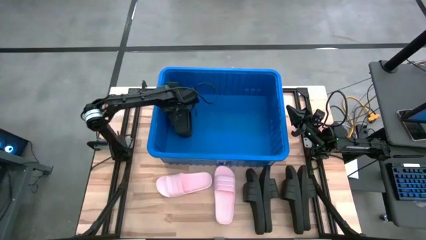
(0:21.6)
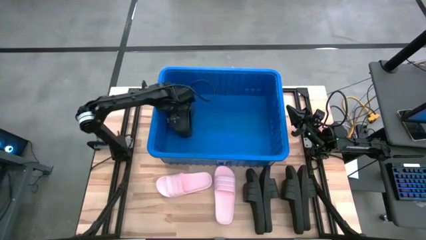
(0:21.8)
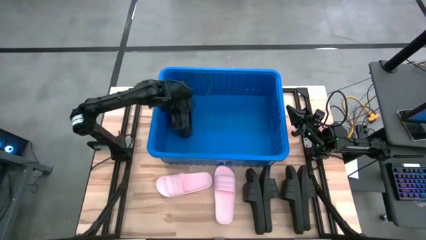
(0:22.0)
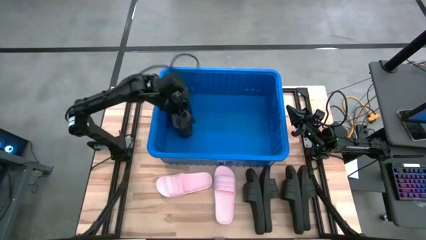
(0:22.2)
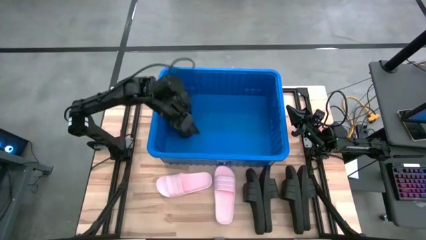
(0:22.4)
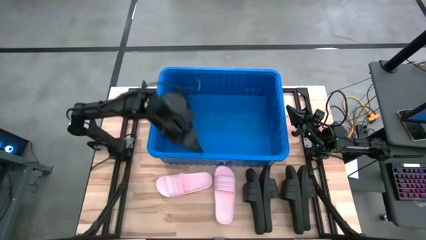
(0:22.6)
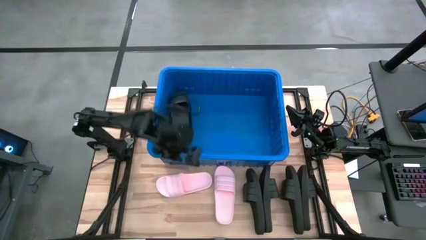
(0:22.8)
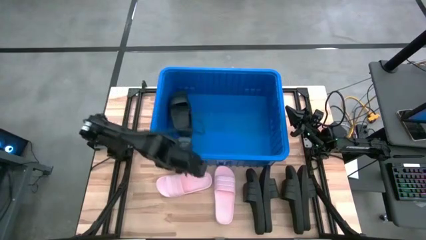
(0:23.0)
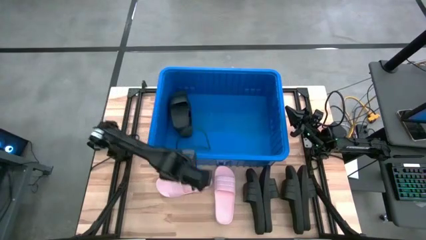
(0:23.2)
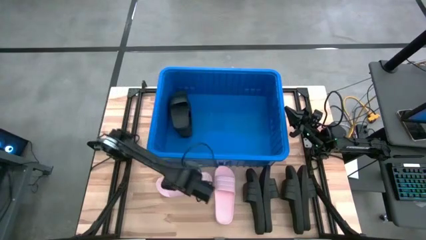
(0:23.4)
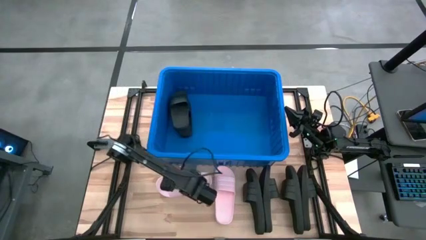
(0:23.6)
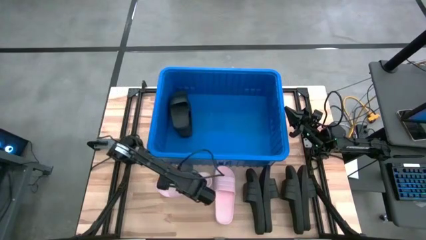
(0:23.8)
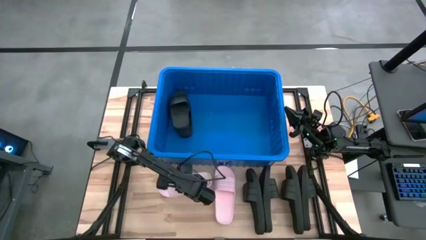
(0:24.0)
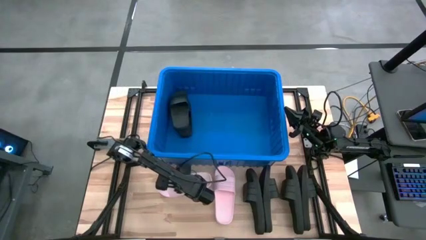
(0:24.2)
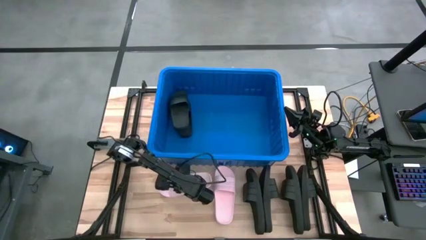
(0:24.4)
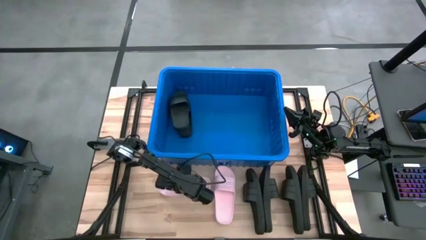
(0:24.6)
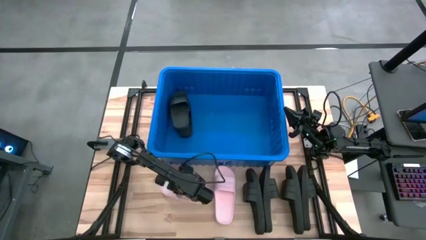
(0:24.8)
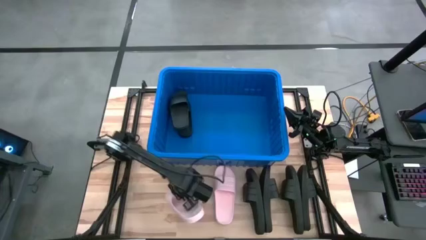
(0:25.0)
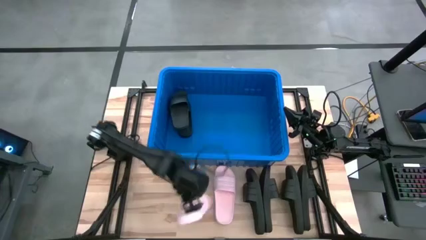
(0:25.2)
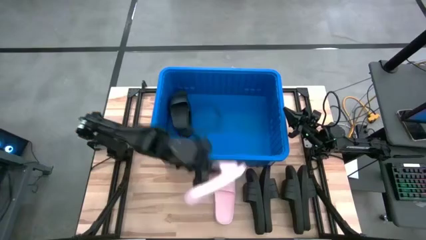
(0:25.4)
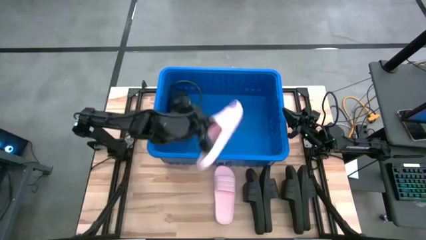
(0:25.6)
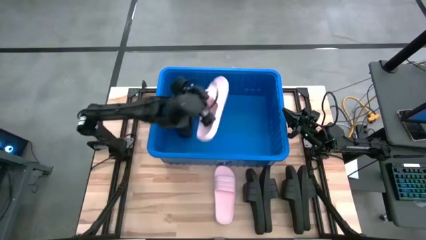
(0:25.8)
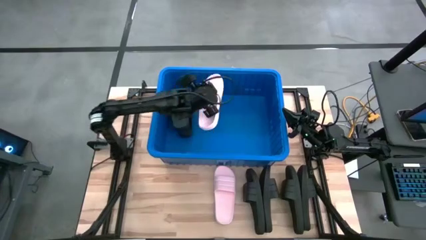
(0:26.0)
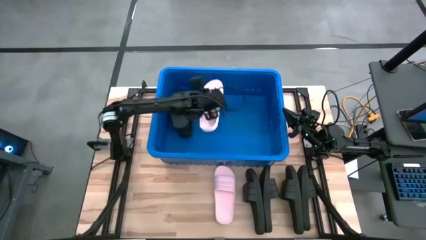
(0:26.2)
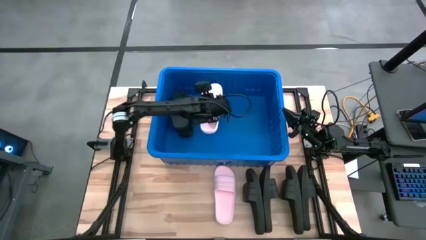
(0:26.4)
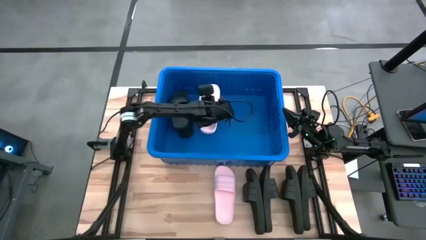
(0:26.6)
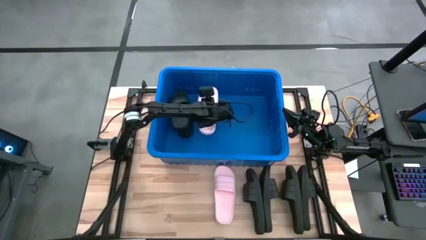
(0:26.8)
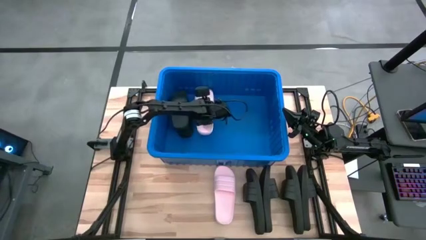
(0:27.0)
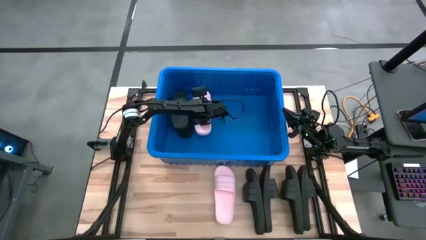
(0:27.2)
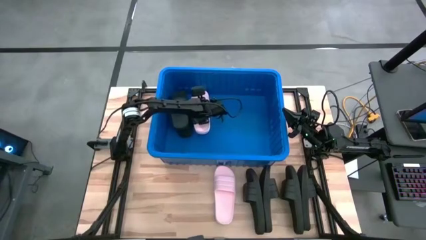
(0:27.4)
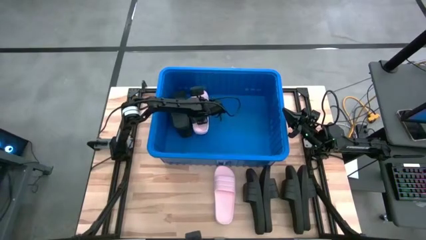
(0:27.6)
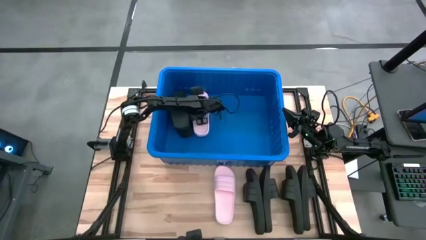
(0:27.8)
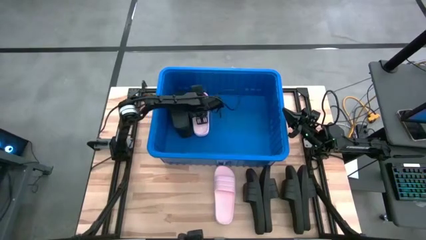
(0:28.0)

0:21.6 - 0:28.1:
Task: Pick and place slides into bin
Put the left pink slide into the bin

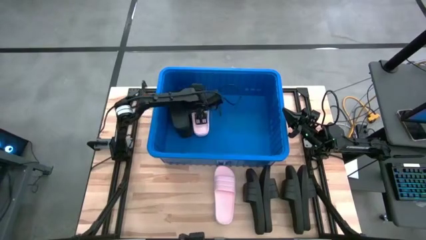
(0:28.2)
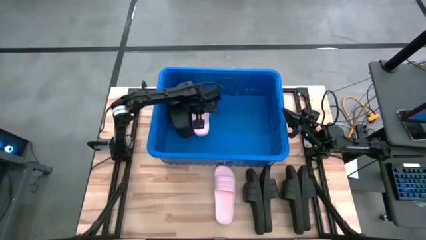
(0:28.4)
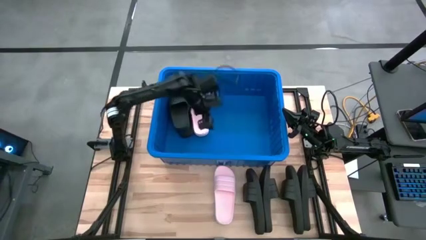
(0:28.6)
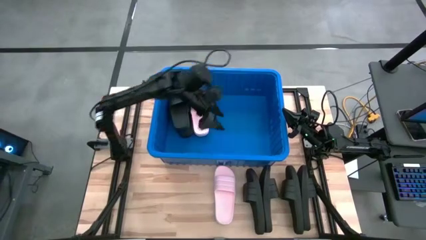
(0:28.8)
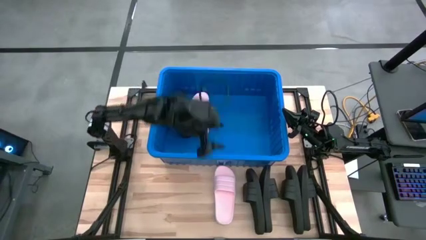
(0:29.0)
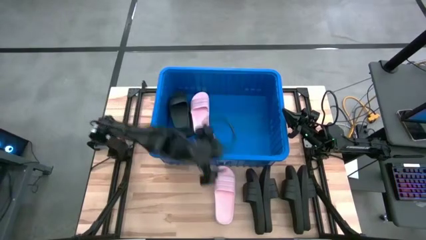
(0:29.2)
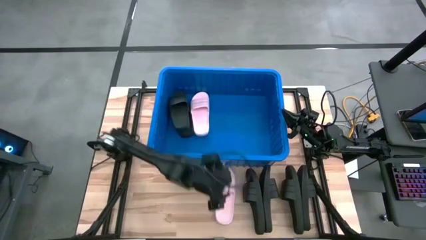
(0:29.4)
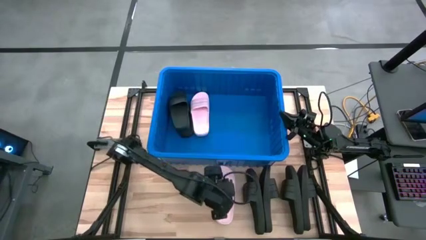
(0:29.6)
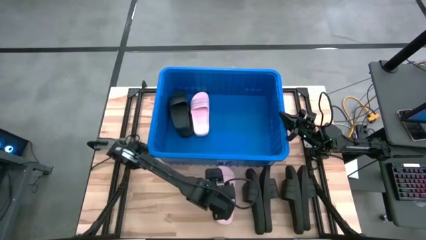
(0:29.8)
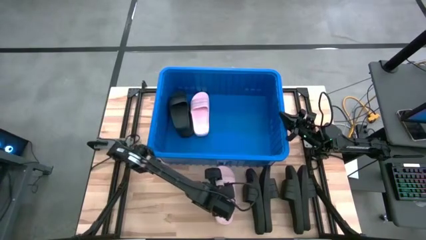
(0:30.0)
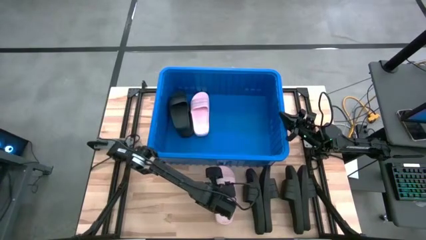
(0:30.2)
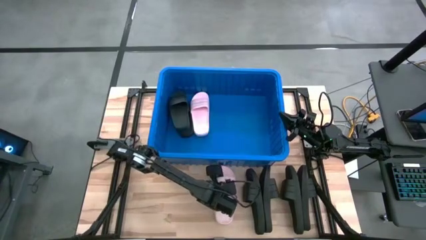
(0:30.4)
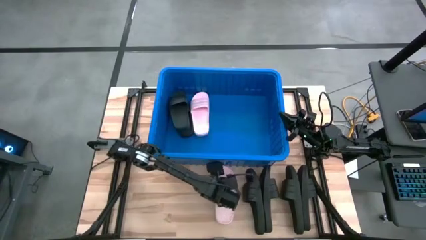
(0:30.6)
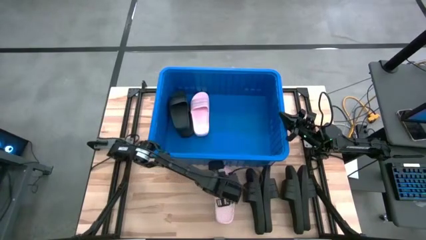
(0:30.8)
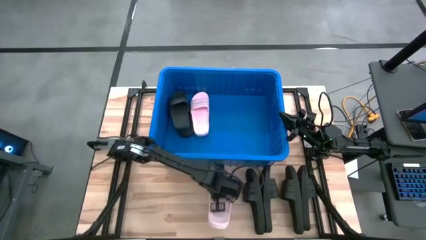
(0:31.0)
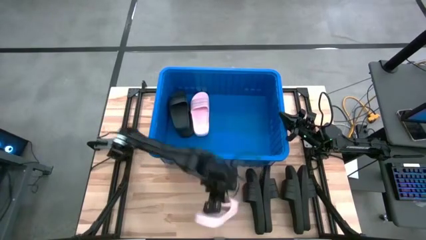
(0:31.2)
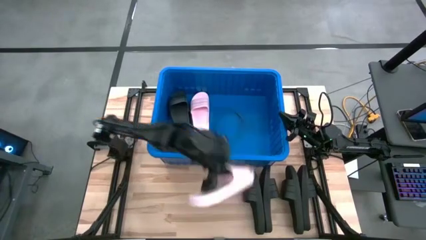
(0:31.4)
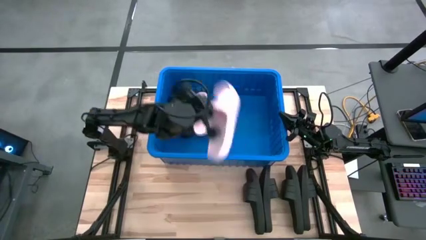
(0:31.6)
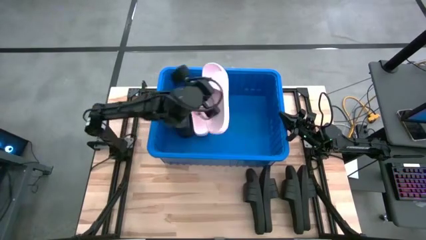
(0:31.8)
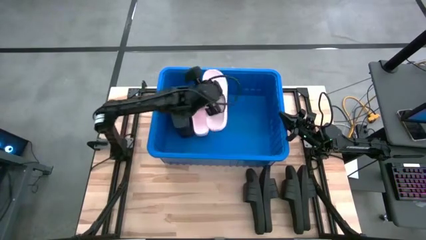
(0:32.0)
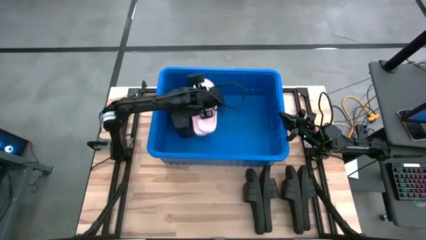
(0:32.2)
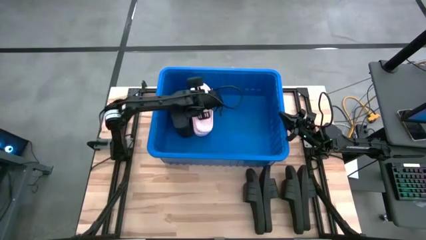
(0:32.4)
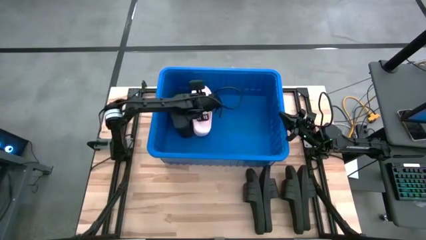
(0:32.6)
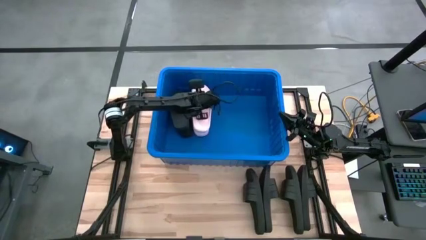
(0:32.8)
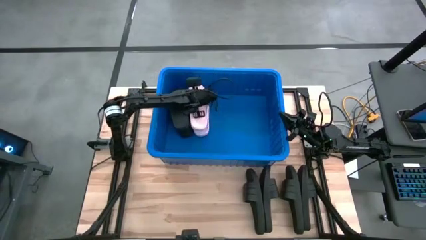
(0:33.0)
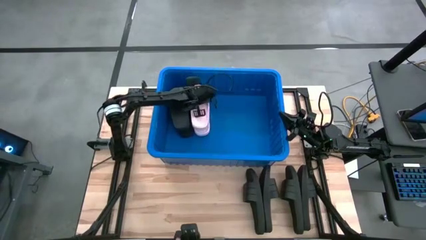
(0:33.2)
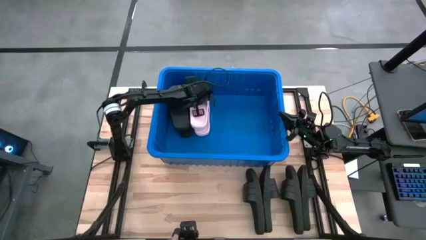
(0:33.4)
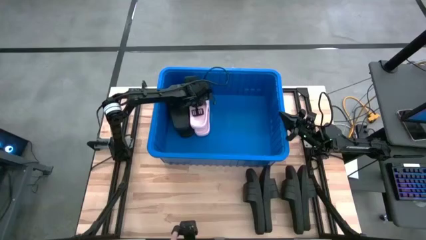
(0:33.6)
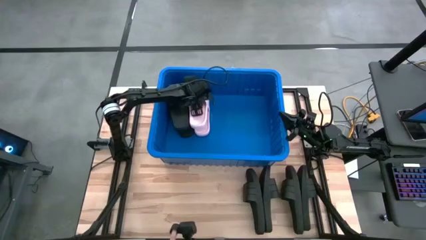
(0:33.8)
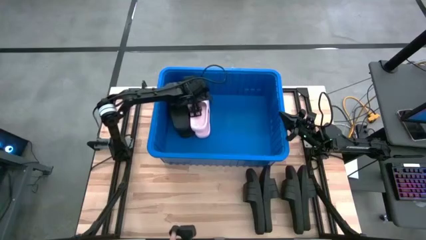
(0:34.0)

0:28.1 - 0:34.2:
Put the pink slide into the bin

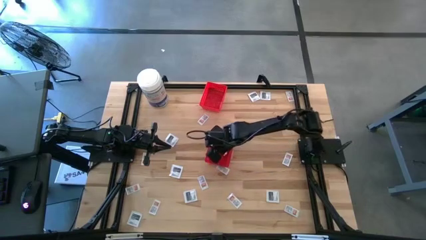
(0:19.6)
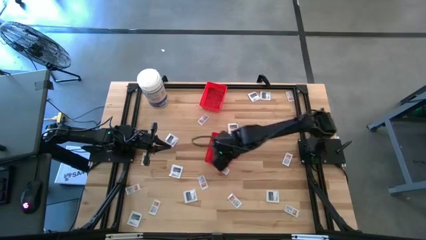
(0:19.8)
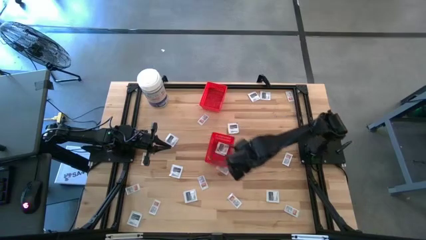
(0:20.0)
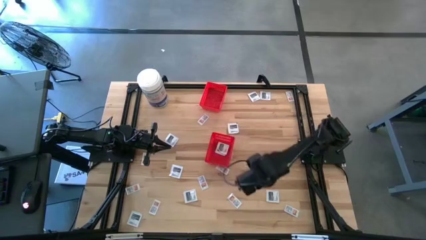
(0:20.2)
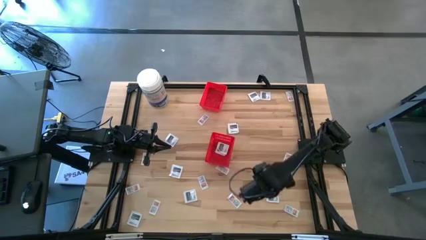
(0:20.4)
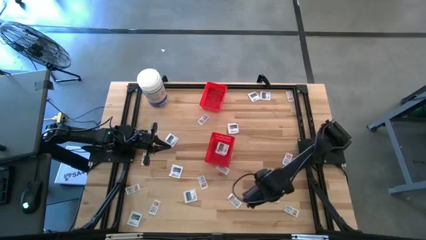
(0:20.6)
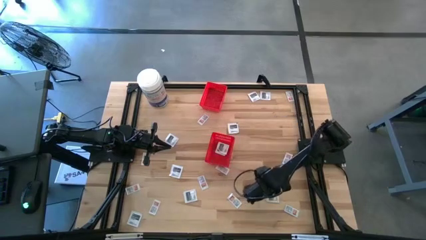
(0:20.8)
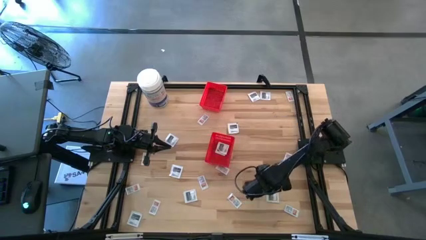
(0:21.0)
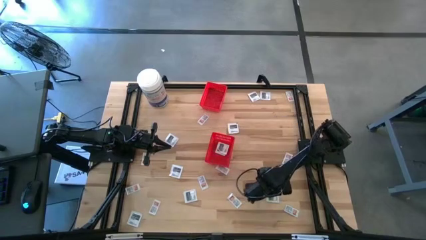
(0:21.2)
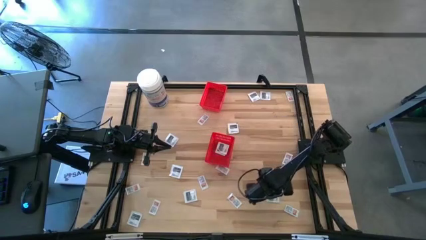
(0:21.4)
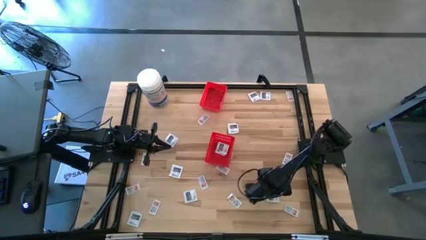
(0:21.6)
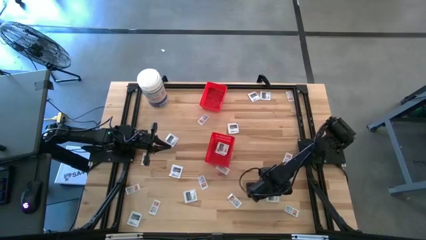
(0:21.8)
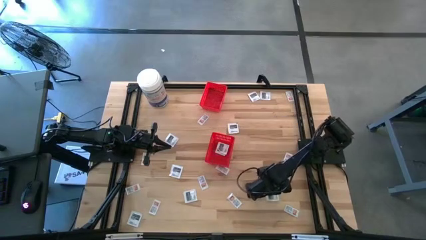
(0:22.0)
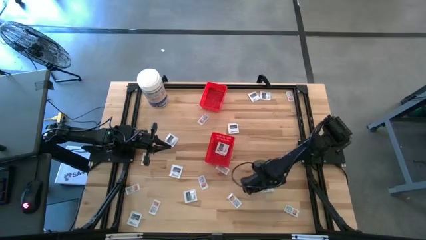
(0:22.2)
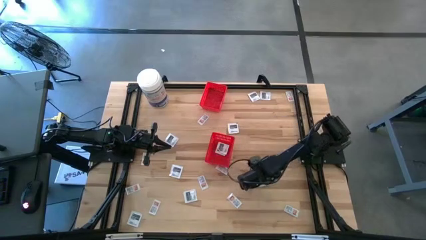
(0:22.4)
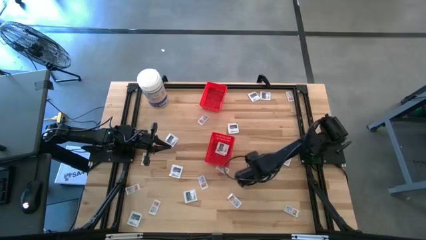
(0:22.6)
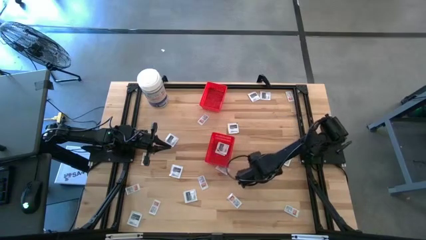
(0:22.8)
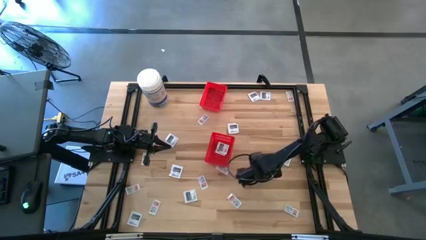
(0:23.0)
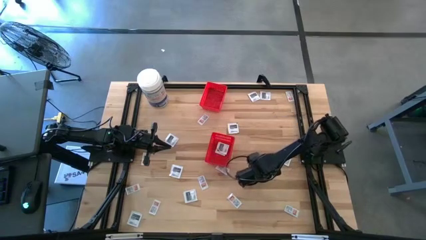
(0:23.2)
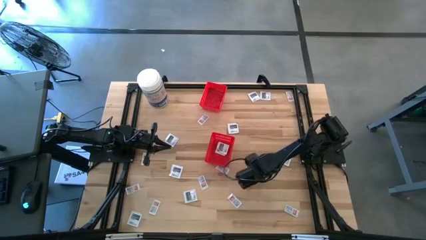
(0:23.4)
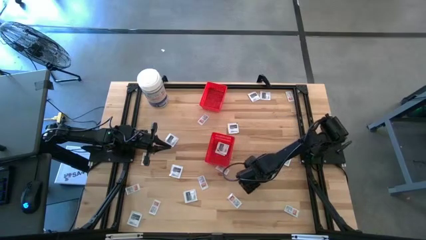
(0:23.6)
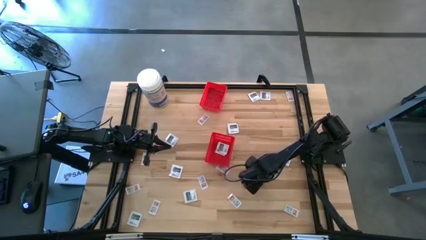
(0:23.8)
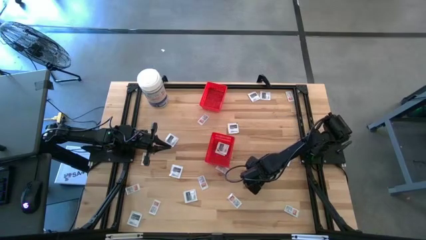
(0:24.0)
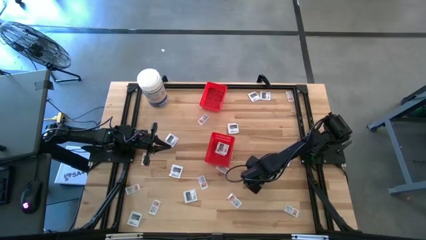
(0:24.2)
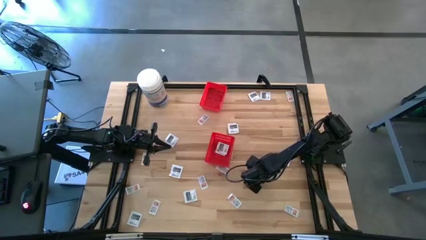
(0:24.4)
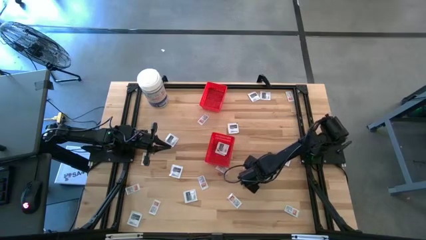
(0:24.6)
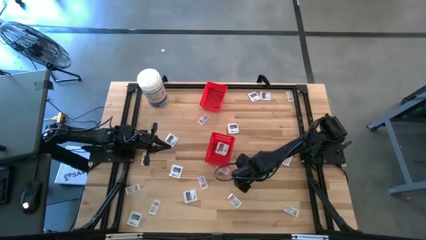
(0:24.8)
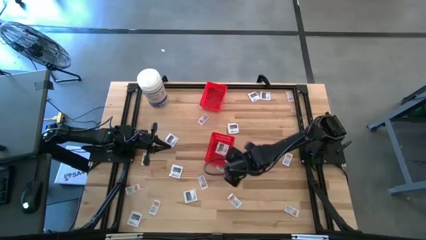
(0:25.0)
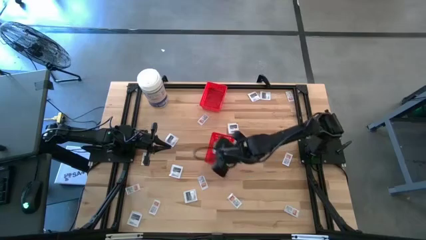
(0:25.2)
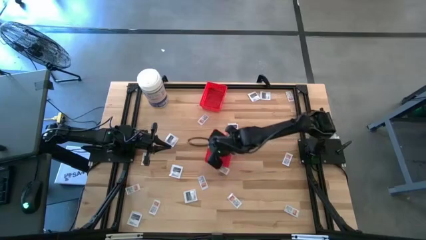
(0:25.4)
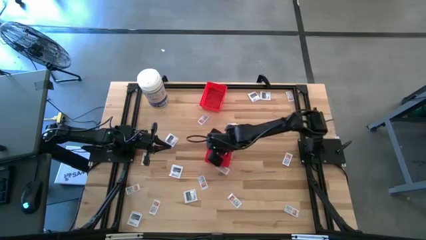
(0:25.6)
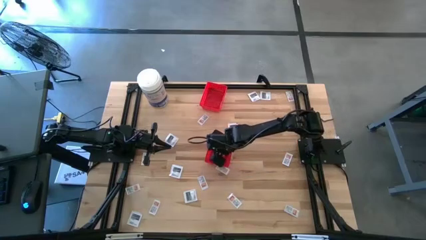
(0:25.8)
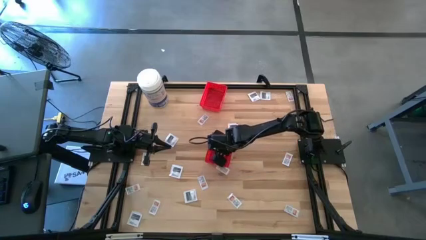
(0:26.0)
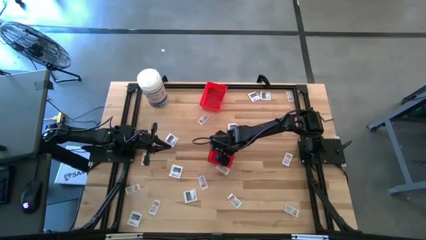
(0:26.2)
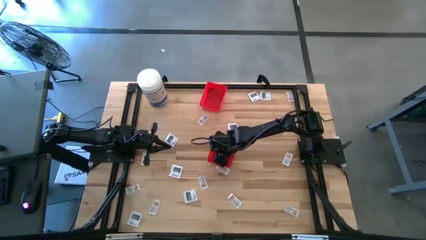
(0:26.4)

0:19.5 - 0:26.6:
Task: Pick & Place First Aid Supplies
Put the white towelette pack into the bottom red bin
